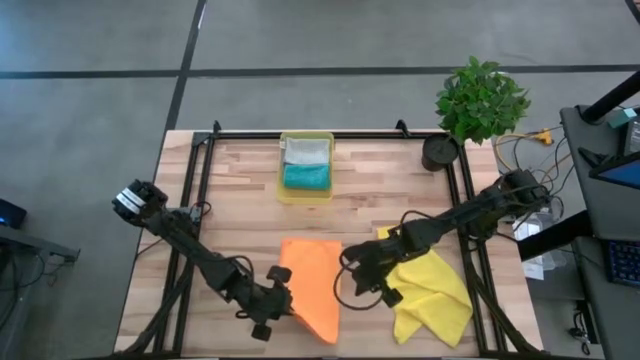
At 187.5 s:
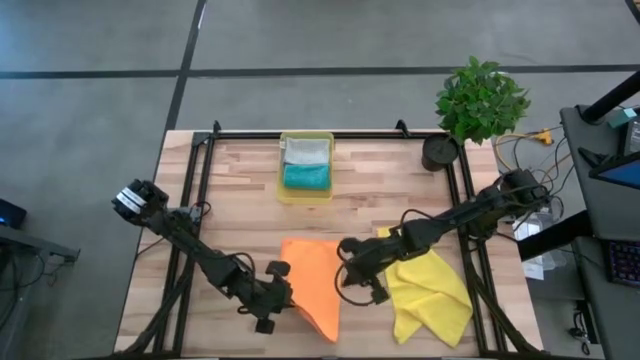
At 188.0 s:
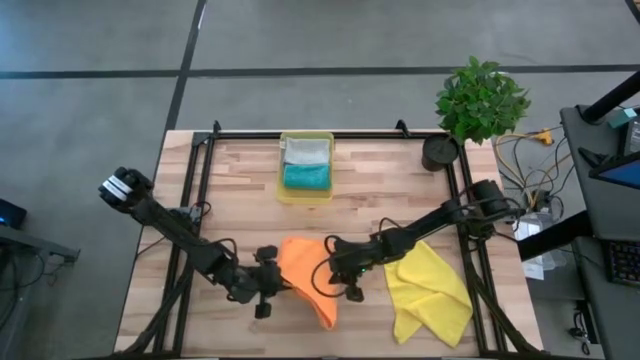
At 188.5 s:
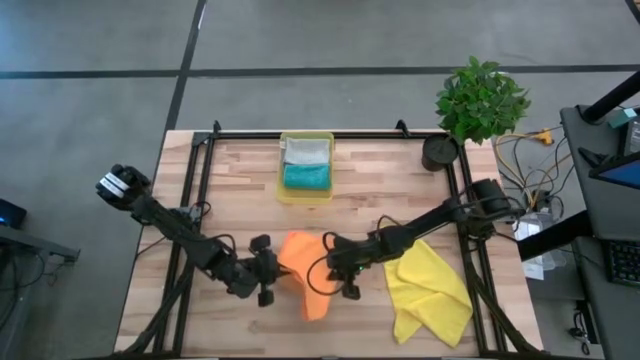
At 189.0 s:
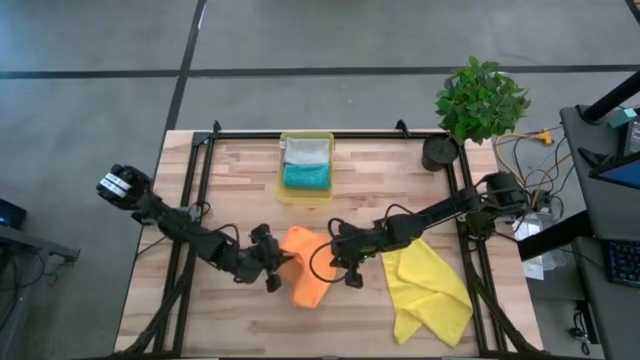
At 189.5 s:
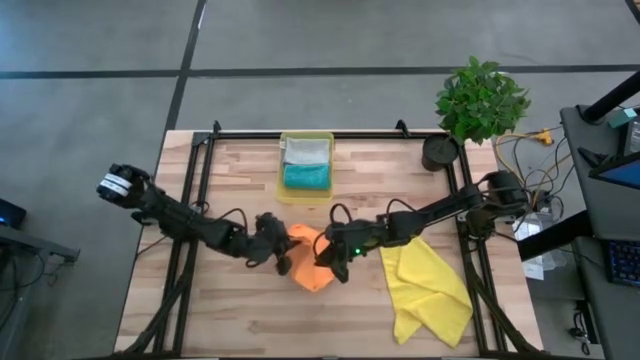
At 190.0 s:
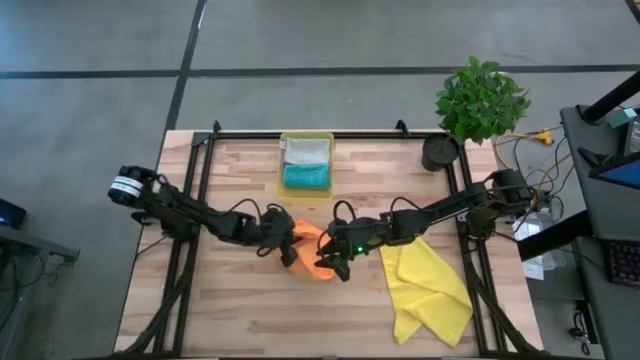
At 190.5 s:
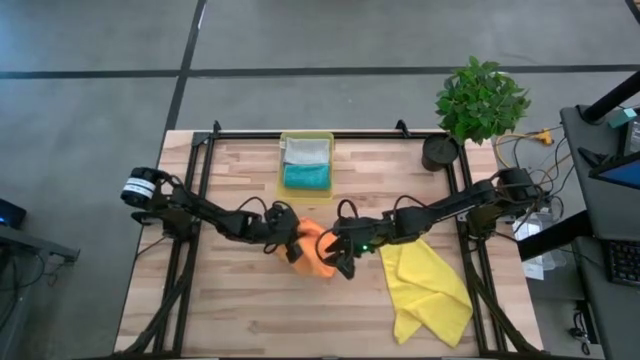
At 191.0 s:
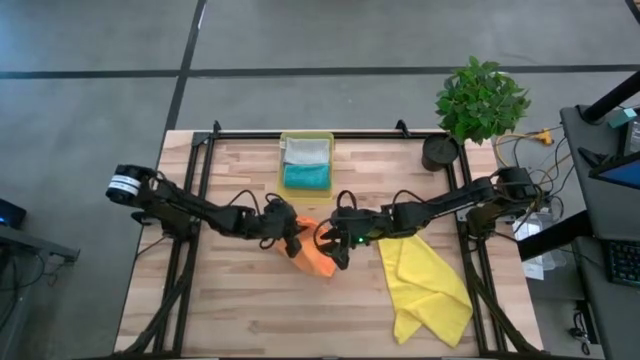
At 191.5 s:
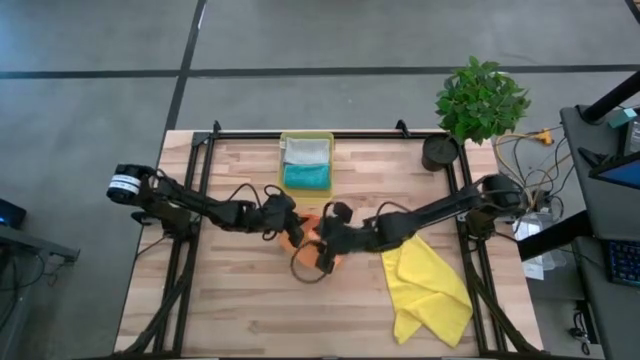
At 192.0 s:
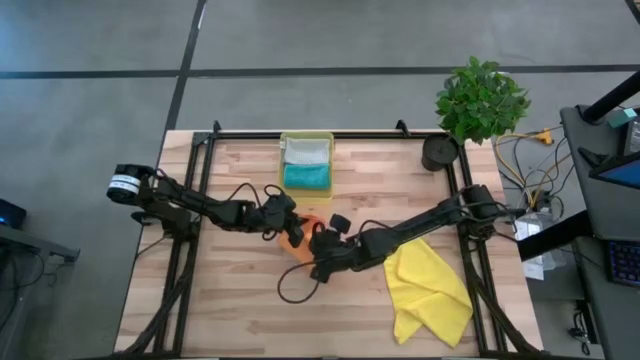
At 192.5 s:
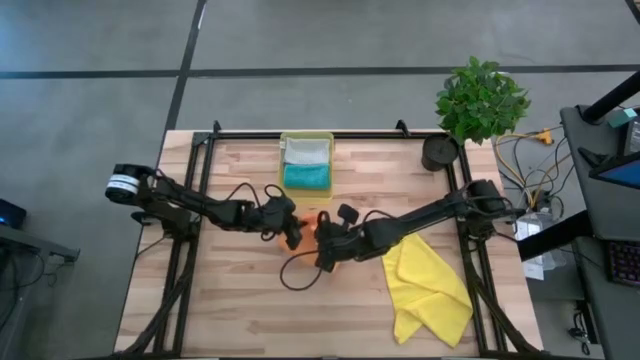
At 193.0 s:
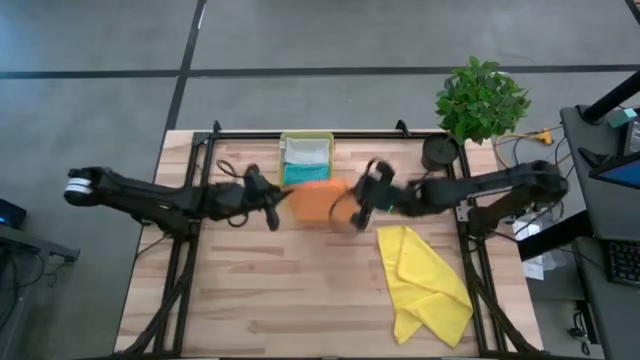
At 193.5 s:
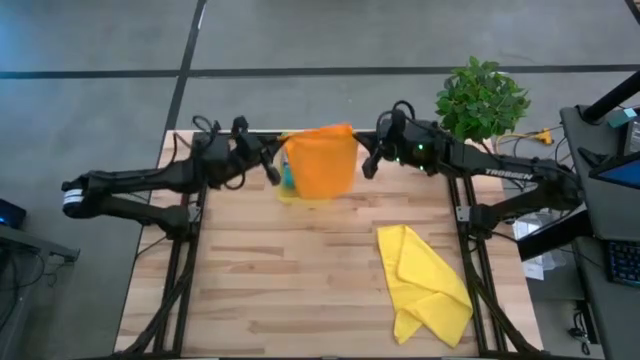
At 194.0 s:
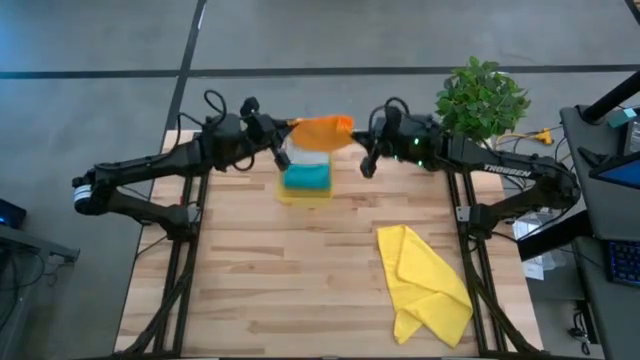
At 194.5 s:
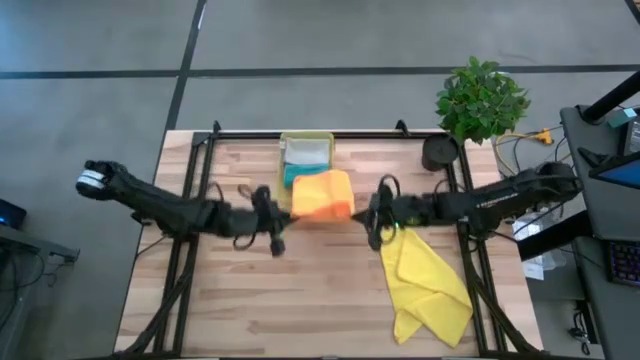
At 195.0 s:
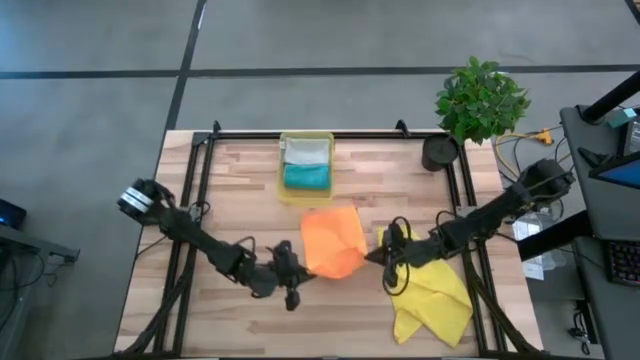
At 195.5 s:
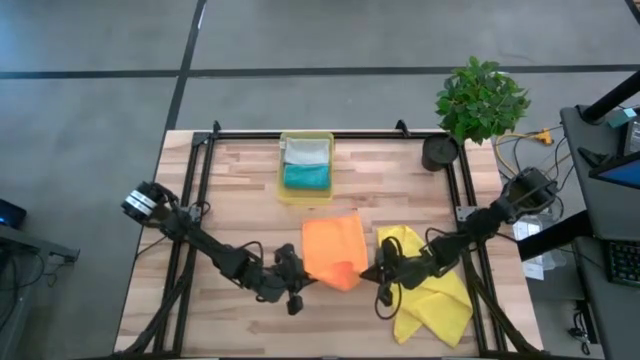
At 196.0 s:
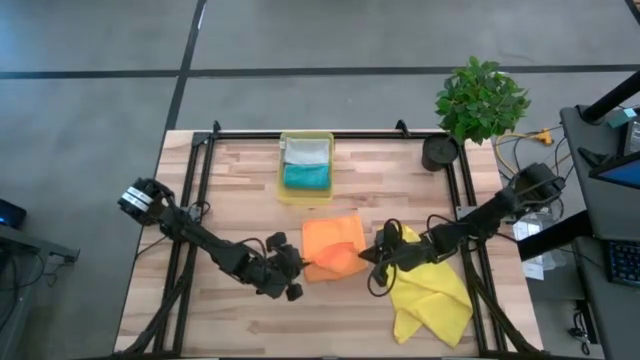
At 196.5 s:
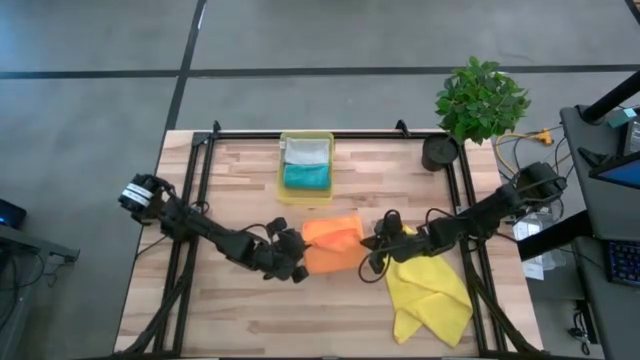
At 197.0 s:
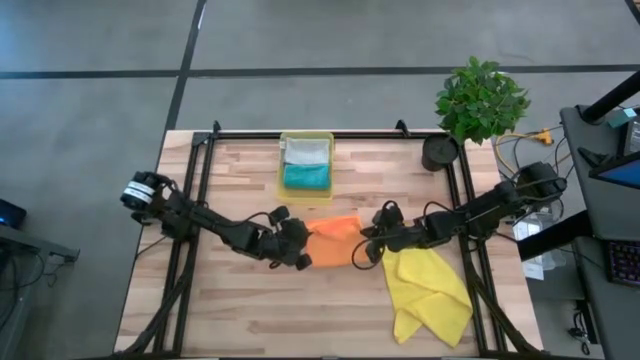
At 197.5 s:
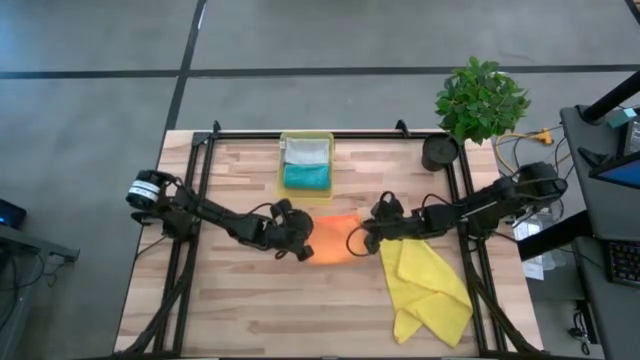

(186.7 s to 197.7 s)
Task: Fold microfiber towels
Fold the orange microfiber cloth

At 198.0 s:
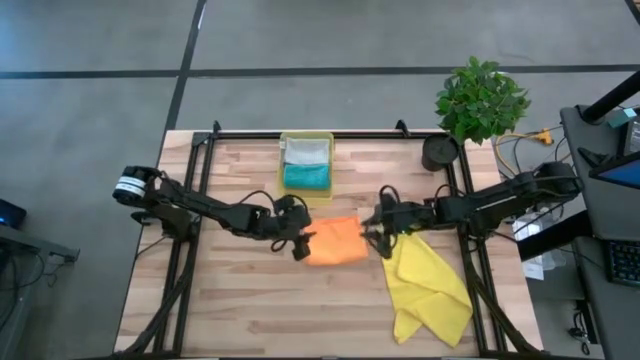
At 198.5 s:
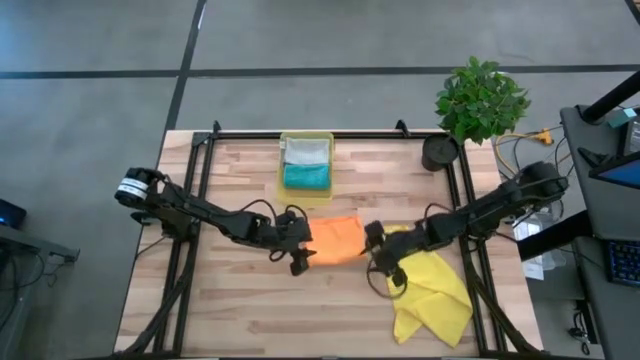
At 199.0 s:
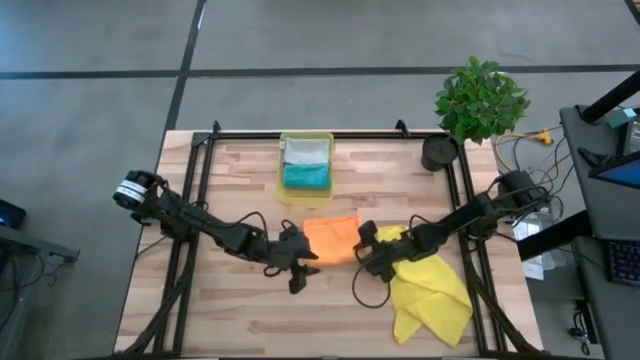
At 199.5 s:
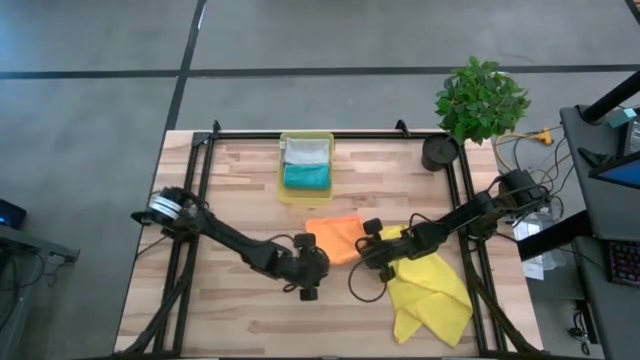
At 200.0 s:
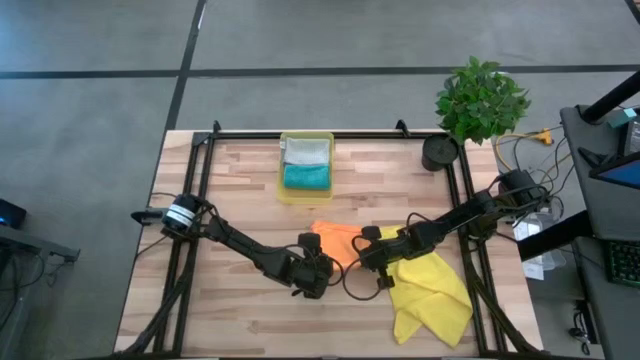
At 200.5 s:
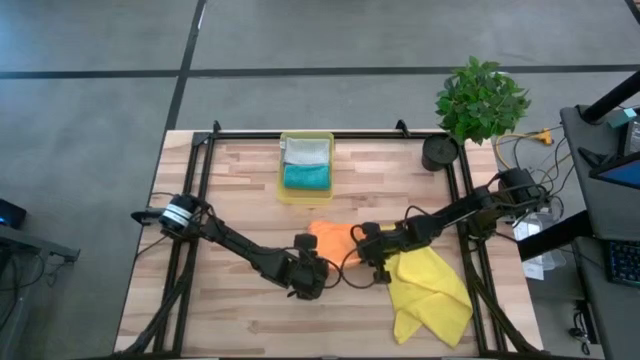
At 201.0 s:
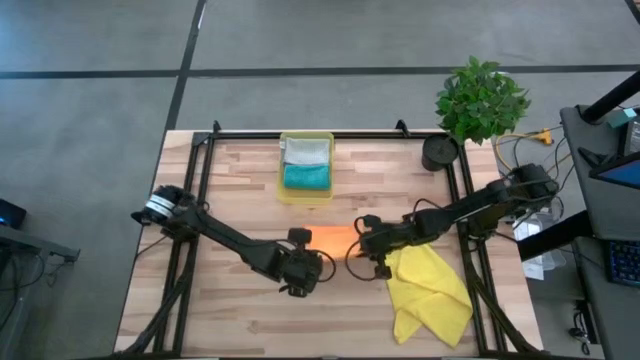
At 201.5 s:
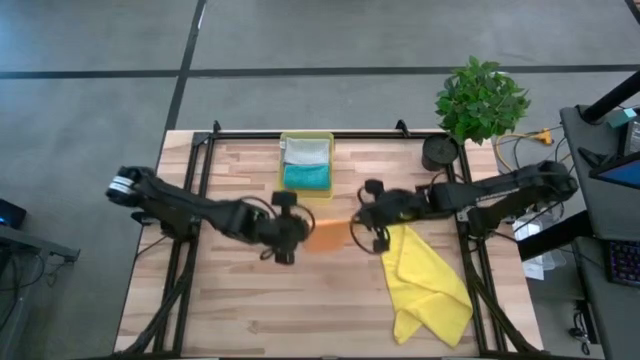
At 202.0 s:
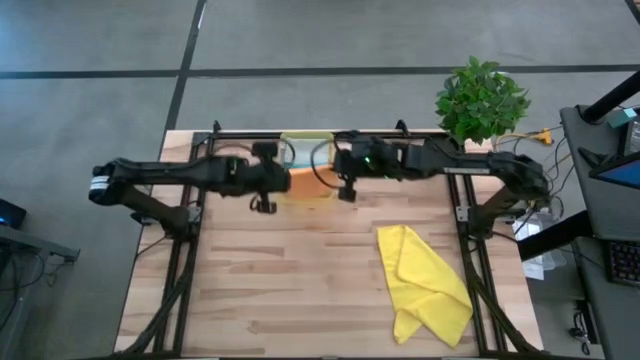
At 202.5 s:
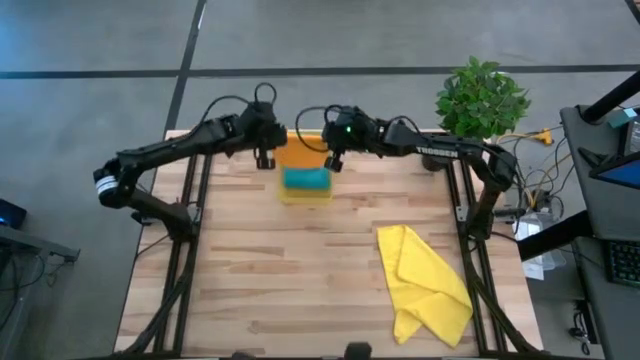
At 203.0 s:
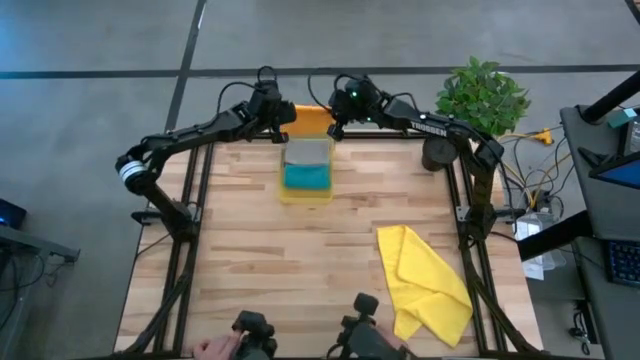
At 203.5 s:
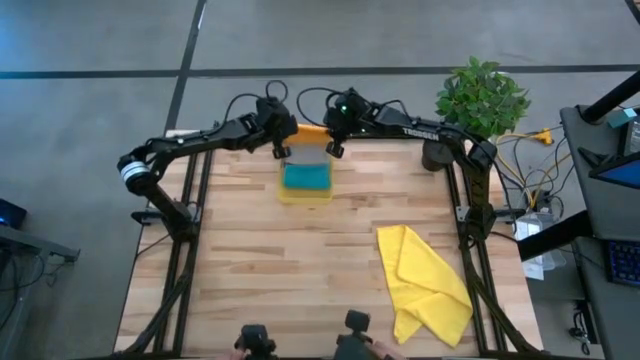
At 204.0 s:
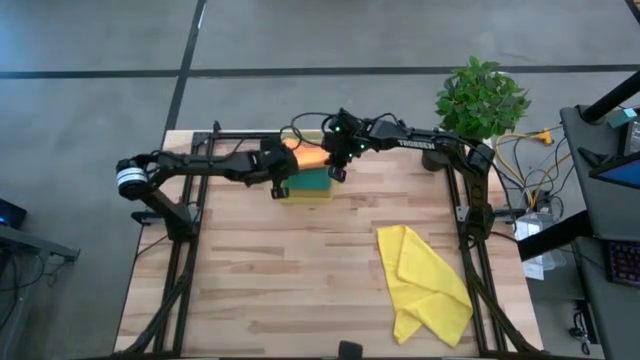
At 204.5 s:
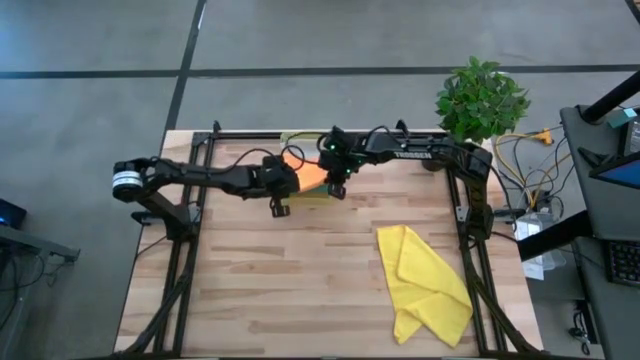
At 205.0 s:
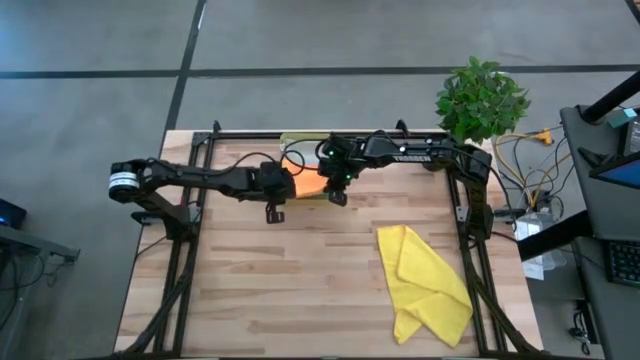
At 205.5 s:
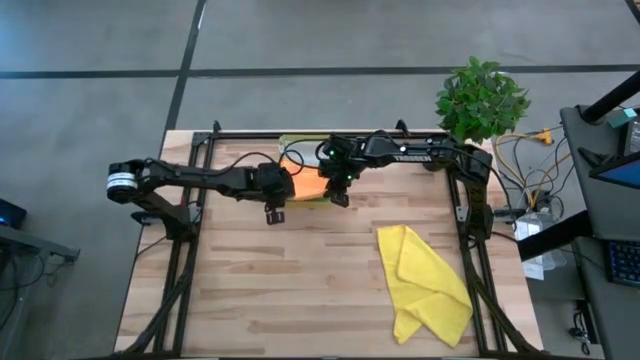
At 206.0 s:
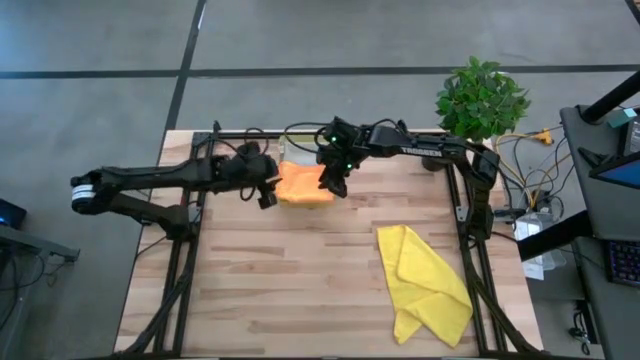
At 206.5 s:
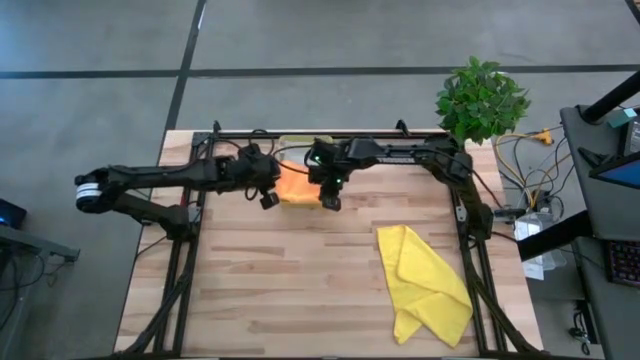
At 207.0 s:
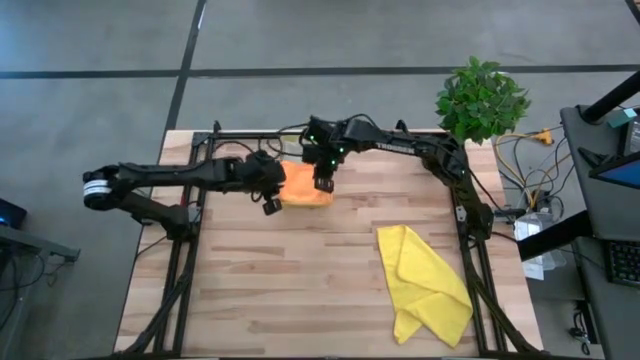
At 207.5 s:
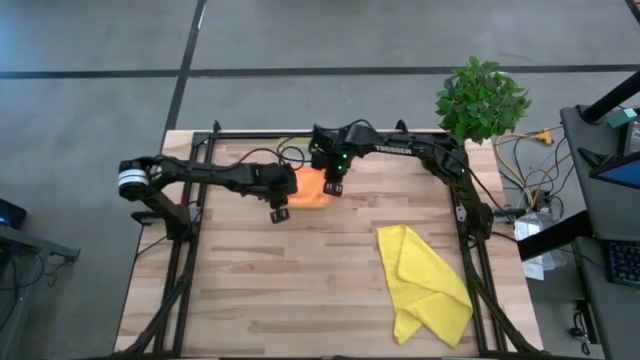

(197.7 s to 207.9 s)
Stack the folded orange microfiber cloth on top of the light blue microfiber cloth
